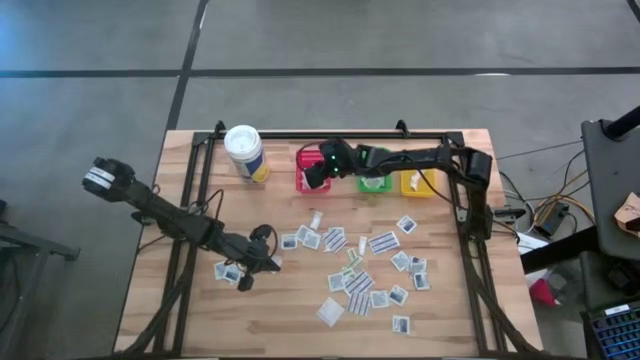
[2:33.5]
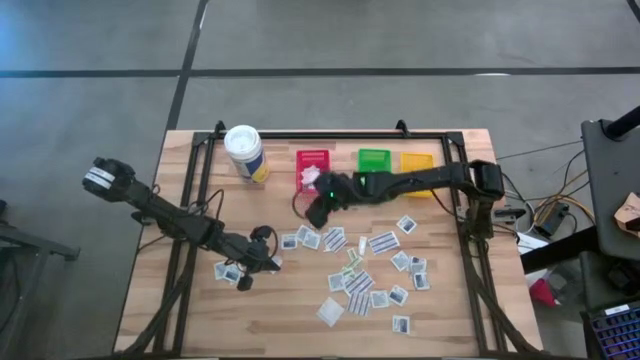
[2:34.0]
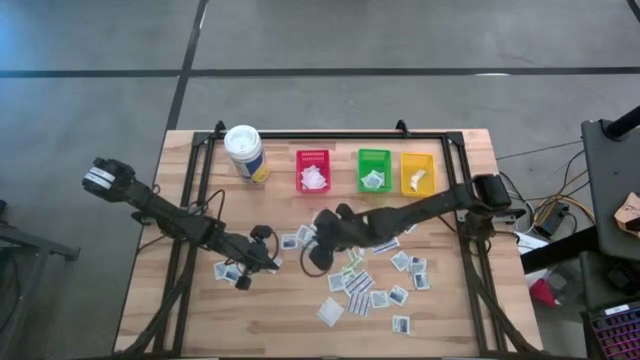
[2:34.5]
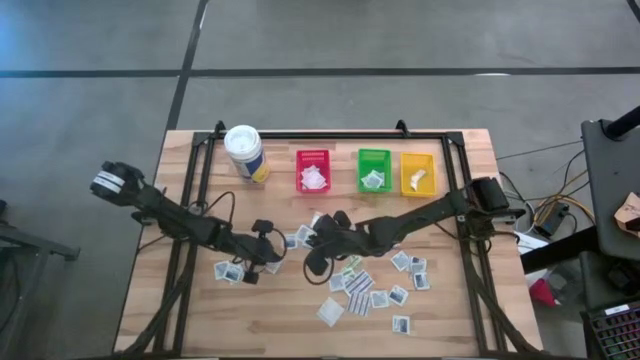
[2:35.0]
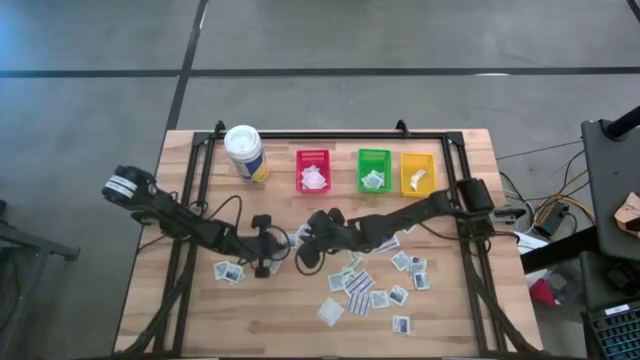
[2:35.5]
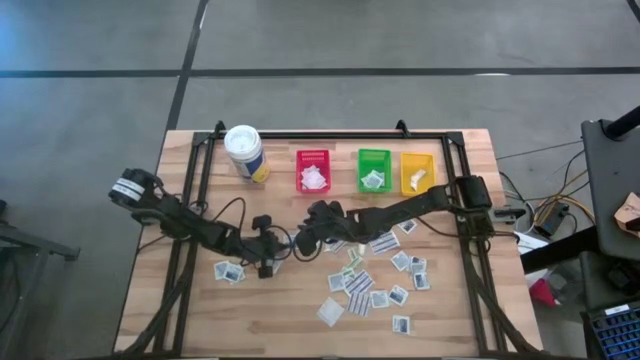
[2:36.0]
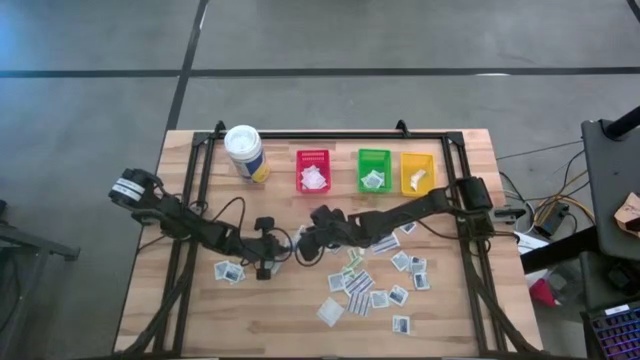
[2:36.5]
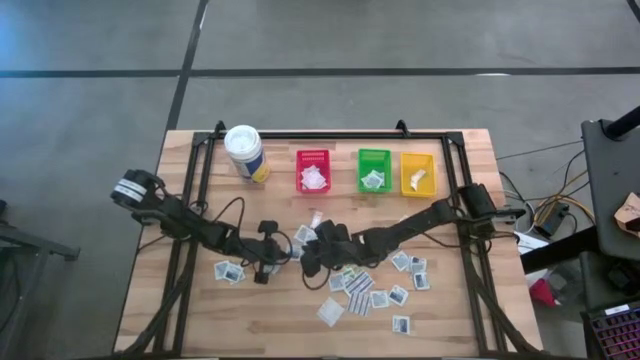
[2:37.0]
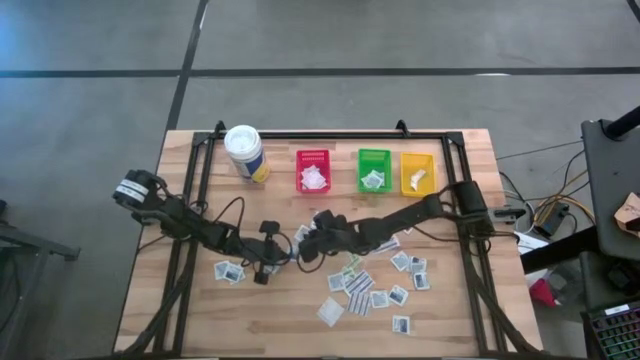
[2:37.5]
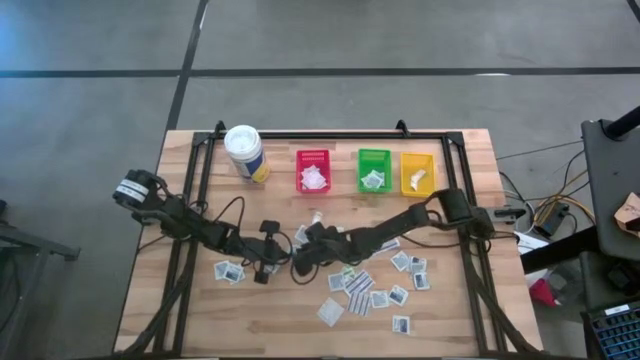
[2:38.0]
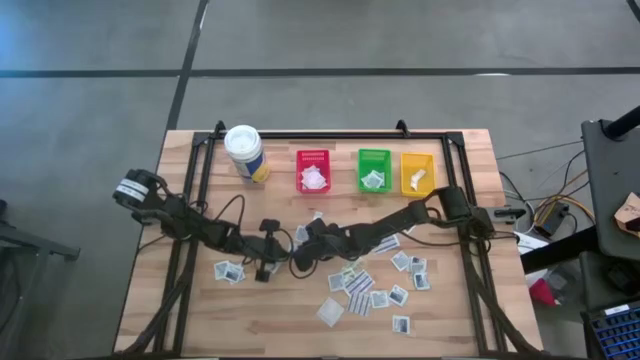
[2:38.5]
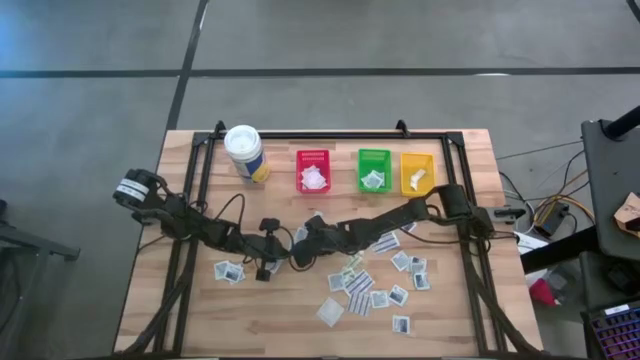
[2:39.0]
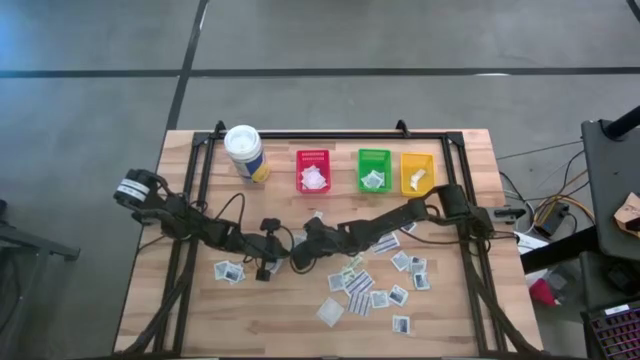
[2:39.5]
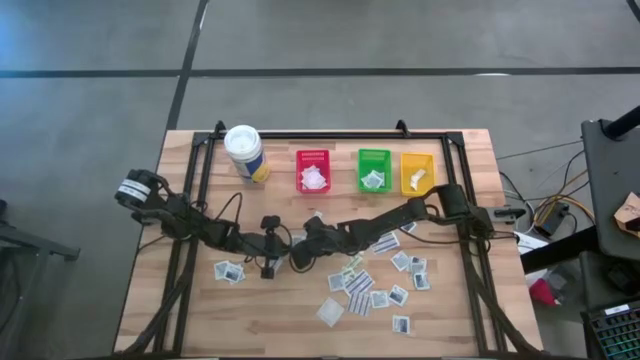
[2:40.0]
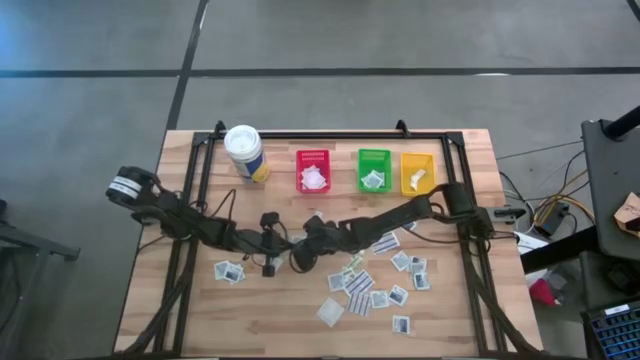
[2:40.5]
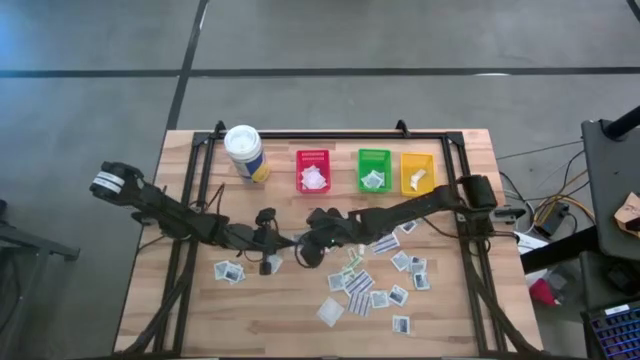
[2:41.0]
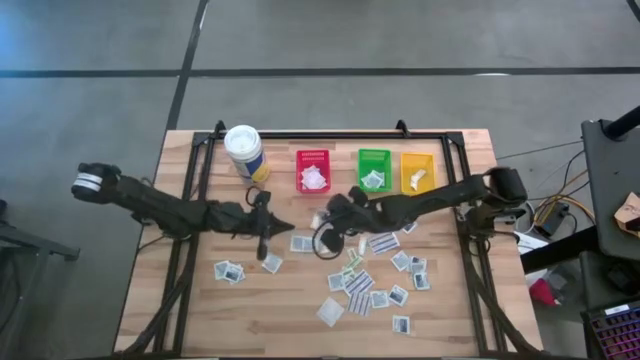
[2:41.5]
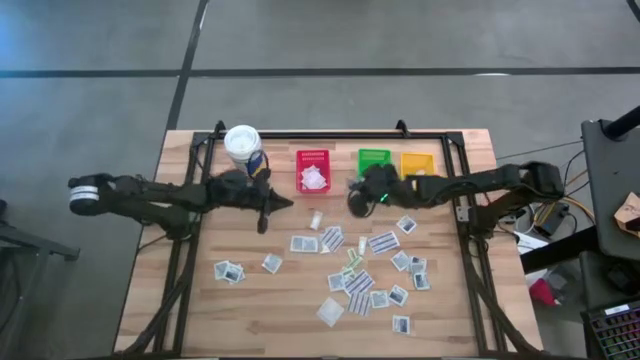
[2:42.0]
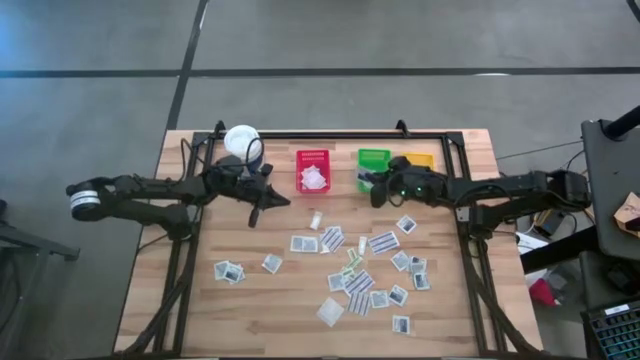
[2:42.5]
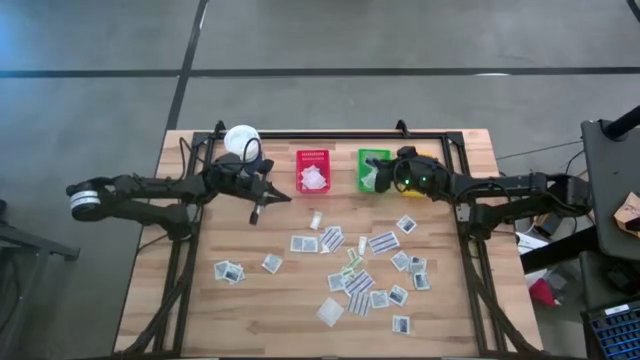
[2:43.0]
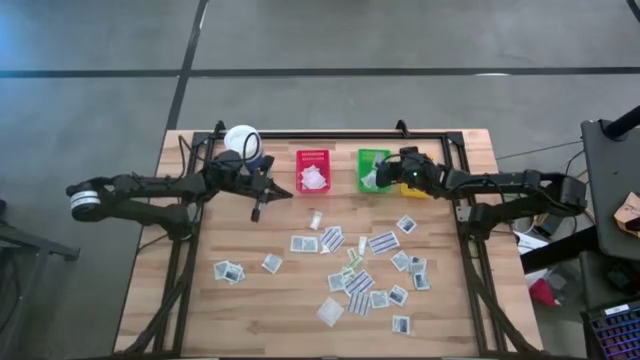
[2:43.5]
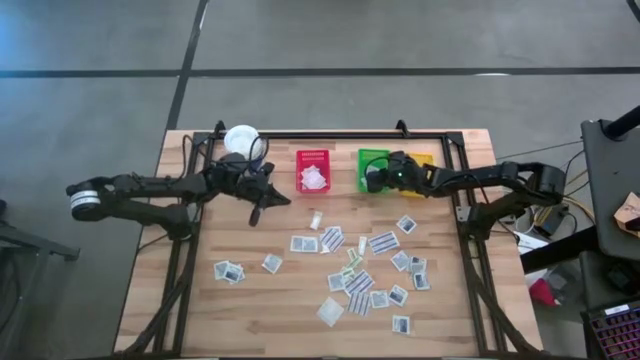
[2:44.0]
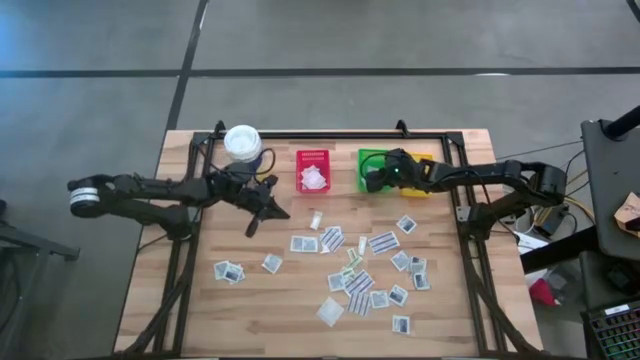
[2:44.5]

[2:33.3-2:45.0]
Task: Pick & Place First Aid Supplies
Put the alcohol pad in the green bin

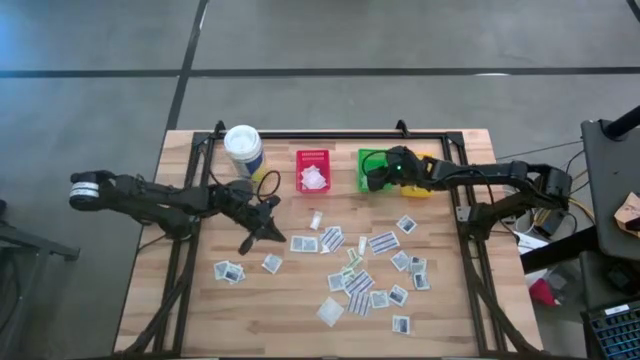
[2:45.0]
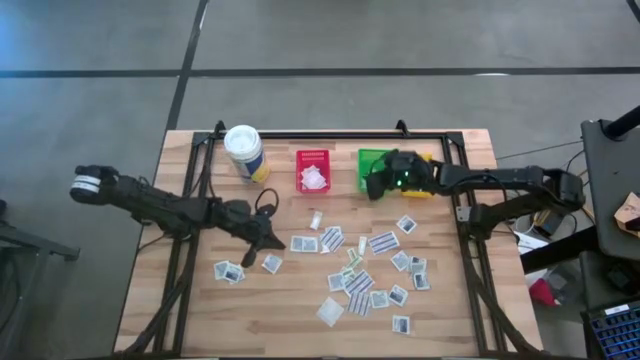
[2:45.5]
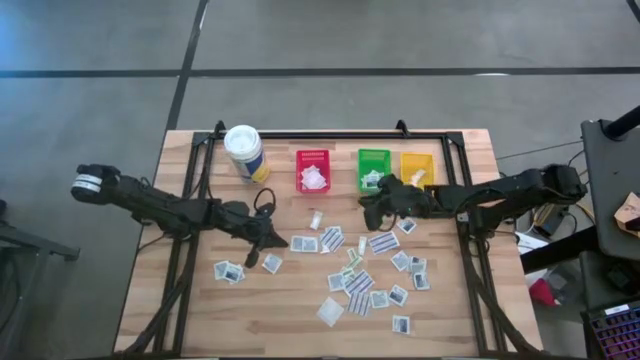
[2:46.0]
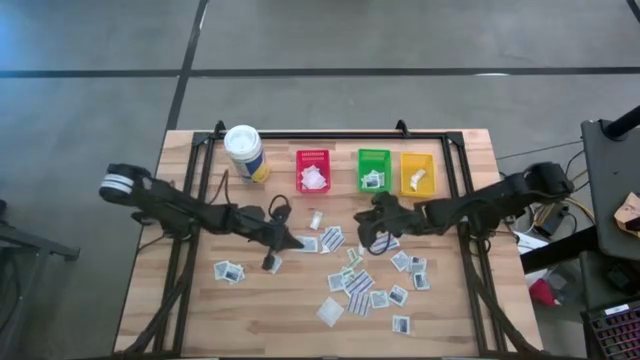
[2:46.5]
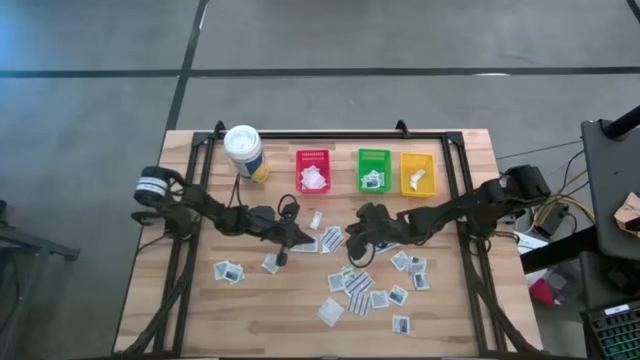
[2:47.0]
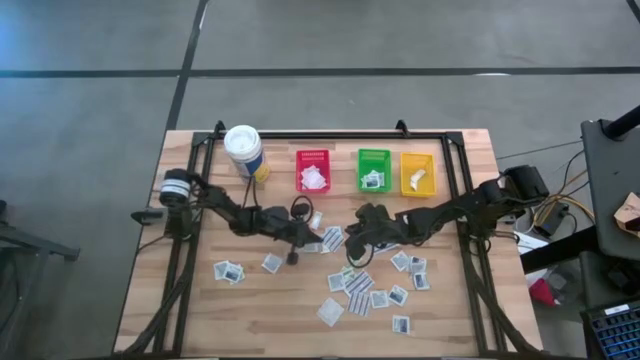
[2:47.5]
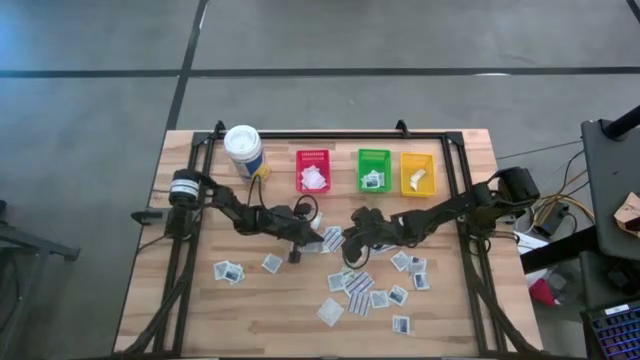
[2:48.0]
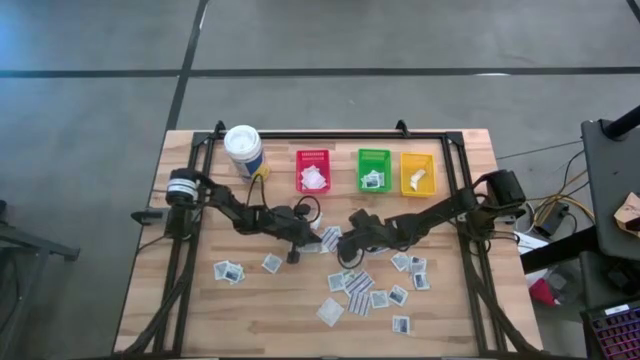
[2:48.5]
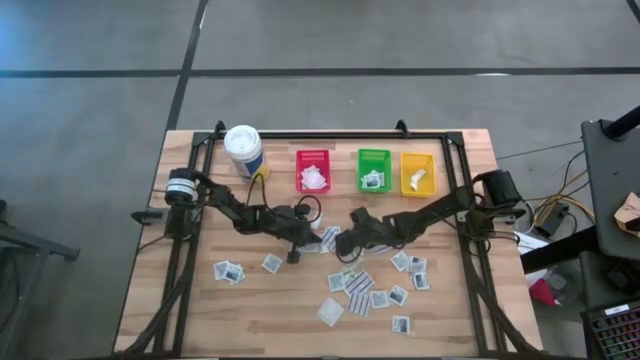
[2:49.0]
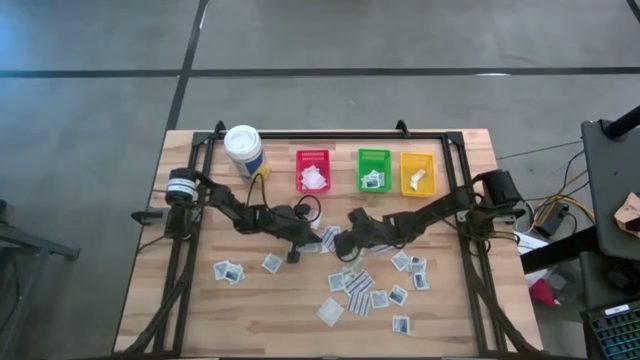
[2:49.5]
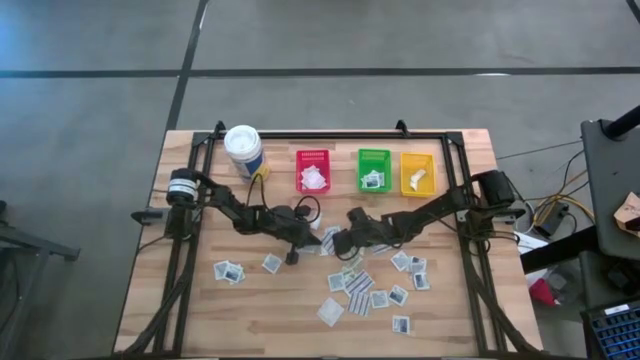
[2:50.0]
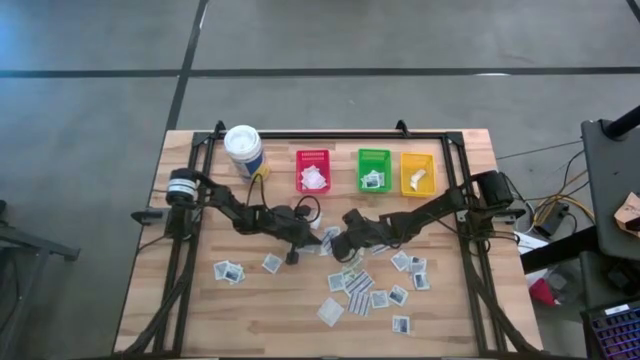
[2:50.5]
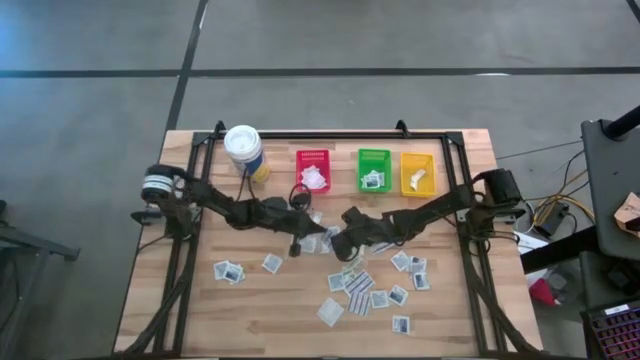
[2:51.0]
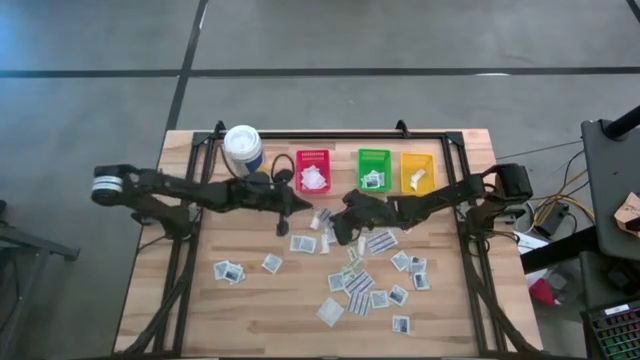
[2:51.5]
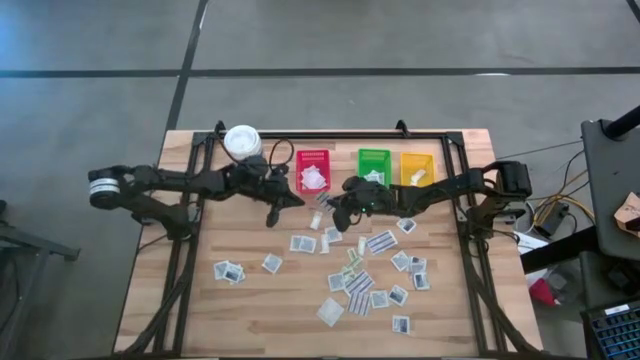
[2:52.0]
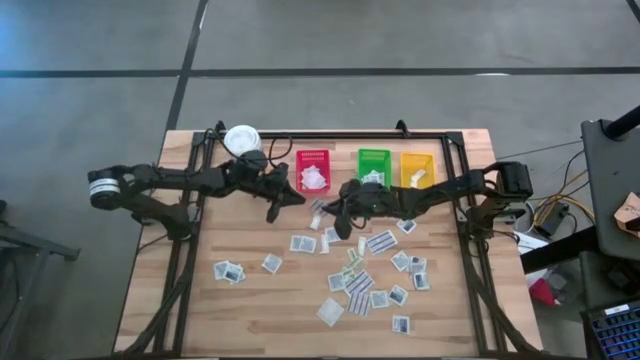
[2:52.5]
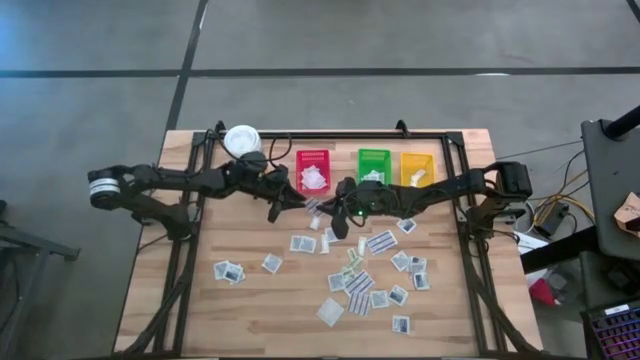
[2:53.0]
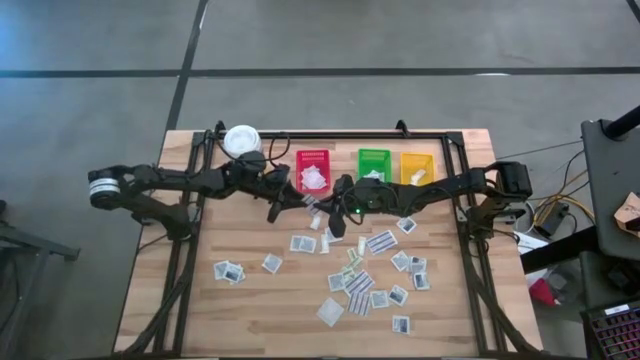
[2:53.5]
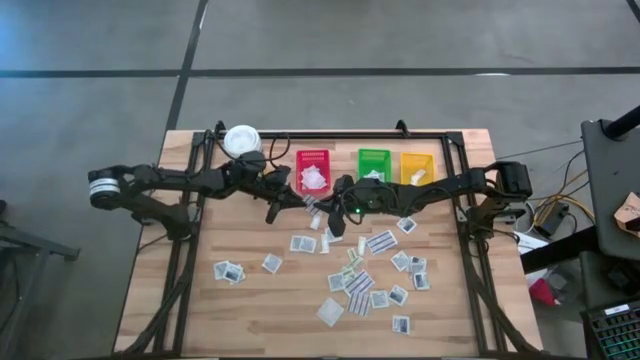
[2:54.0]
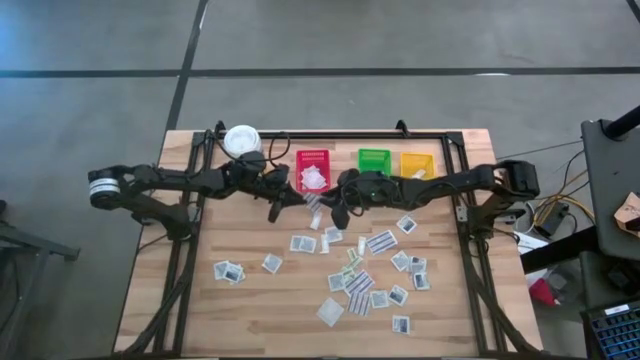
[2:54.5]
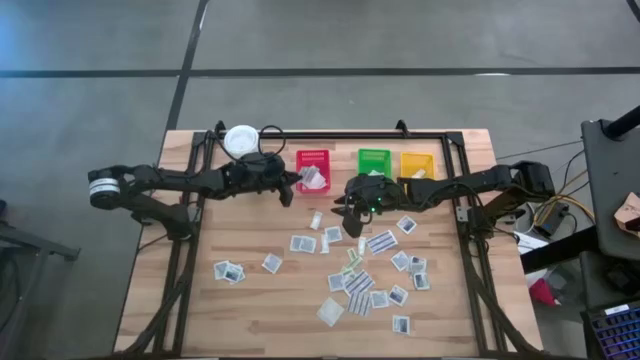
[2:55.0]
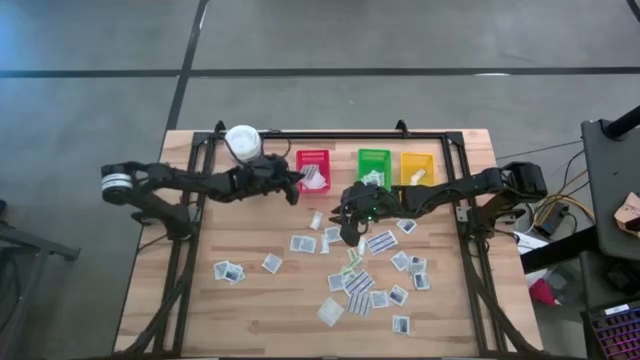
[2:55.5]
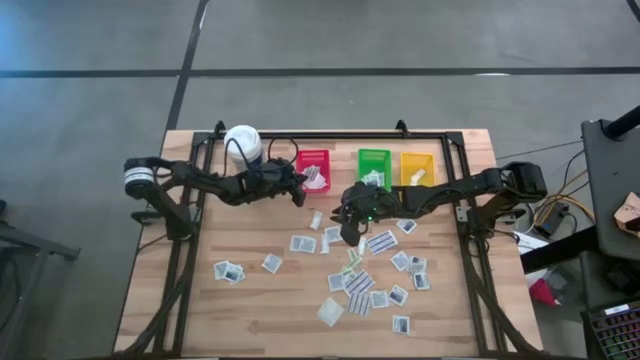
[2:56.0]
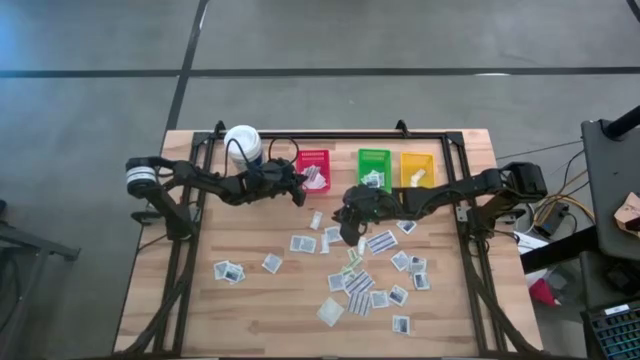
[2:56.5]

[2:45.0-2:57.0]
Put the blue bandage in the red bin
